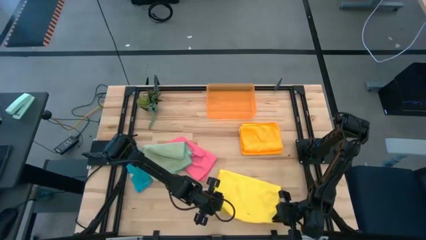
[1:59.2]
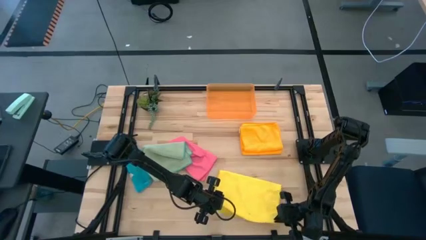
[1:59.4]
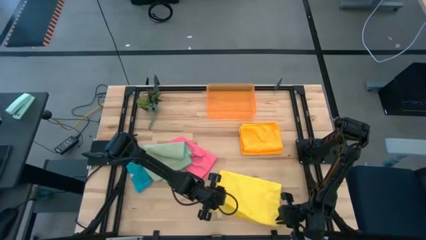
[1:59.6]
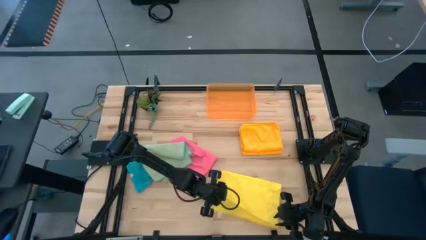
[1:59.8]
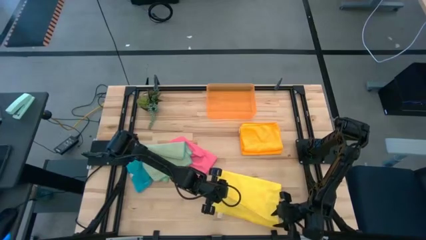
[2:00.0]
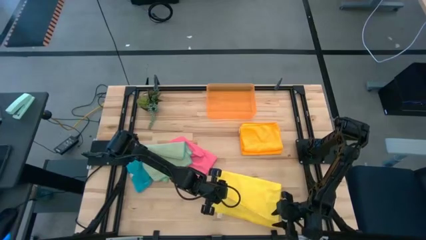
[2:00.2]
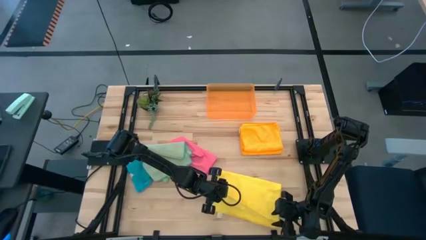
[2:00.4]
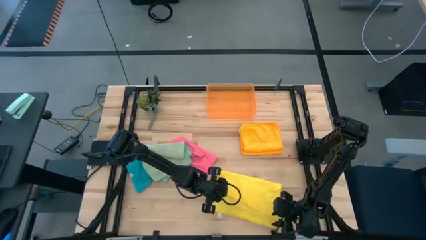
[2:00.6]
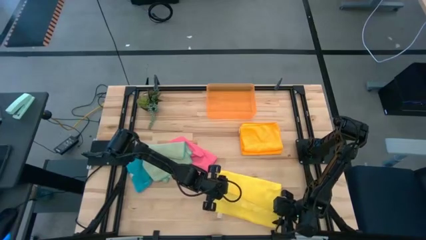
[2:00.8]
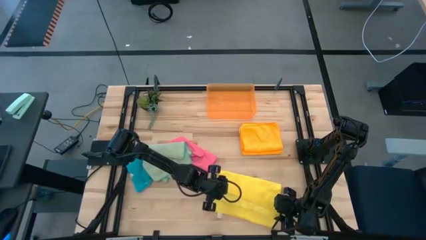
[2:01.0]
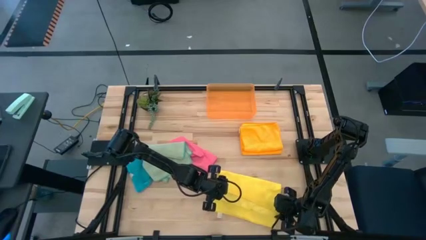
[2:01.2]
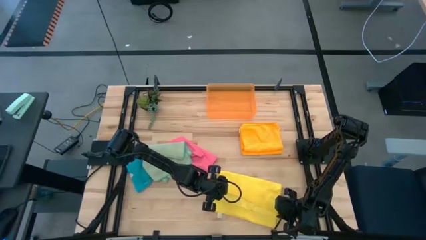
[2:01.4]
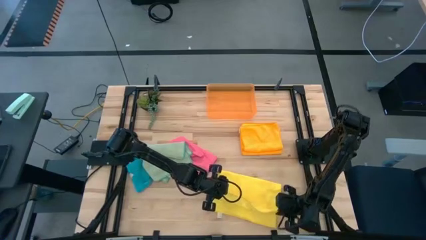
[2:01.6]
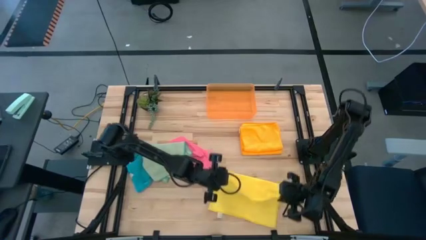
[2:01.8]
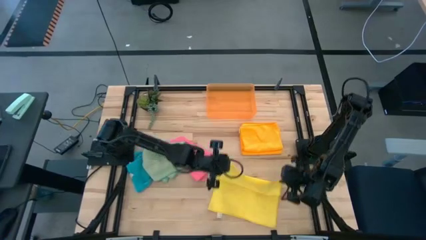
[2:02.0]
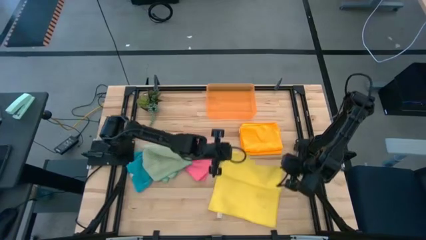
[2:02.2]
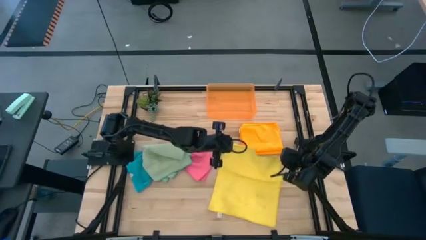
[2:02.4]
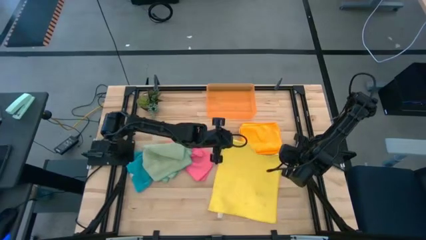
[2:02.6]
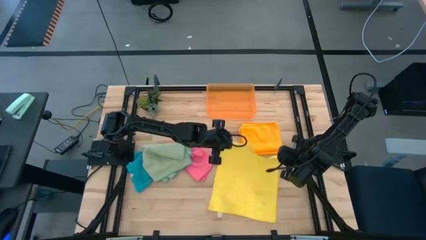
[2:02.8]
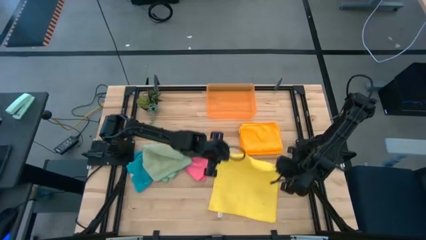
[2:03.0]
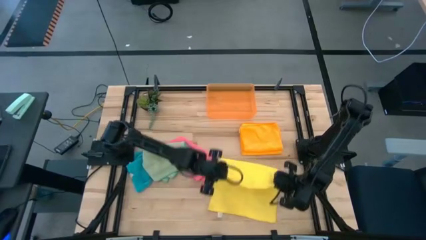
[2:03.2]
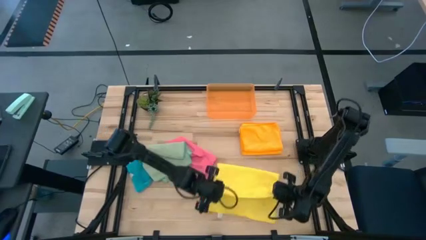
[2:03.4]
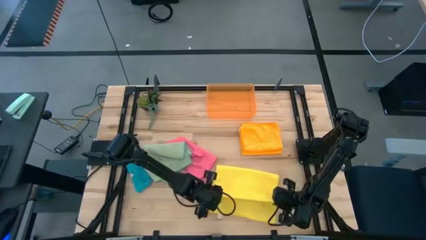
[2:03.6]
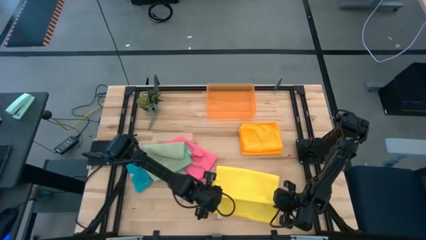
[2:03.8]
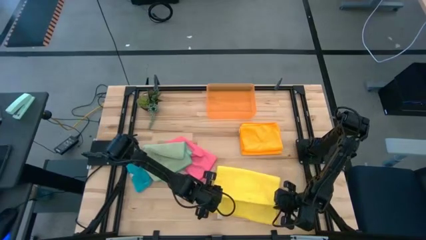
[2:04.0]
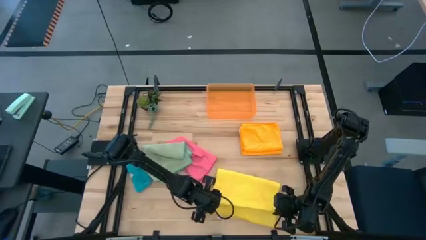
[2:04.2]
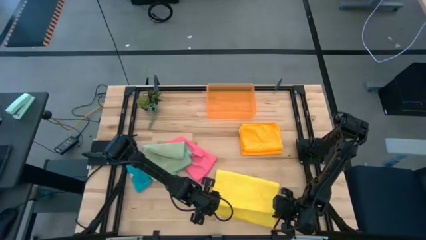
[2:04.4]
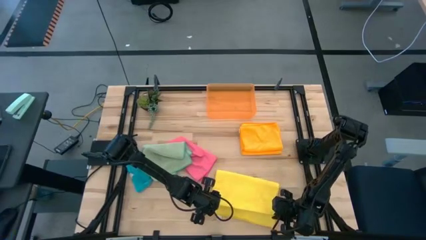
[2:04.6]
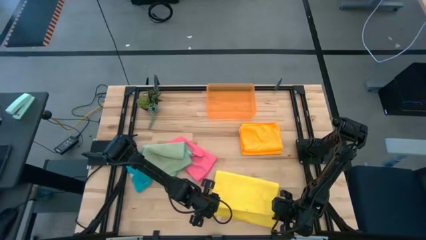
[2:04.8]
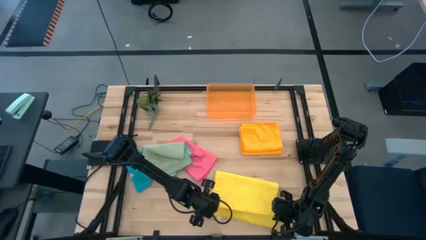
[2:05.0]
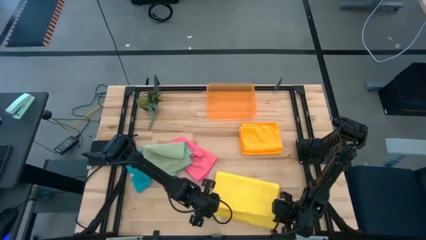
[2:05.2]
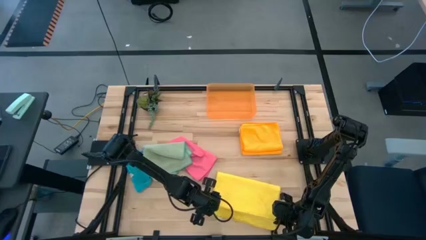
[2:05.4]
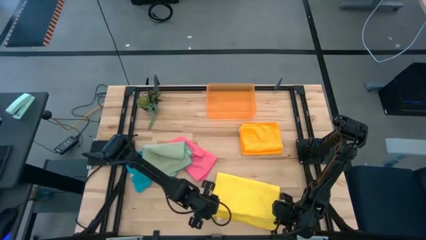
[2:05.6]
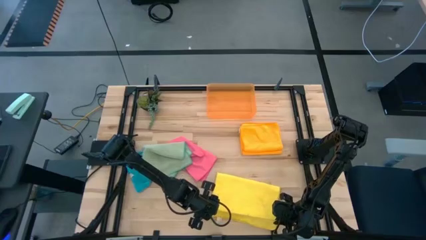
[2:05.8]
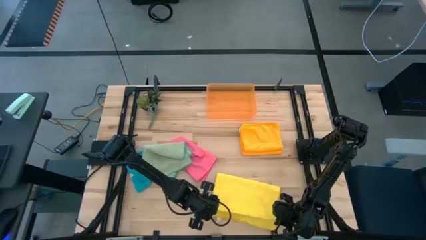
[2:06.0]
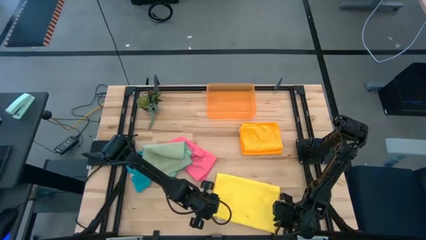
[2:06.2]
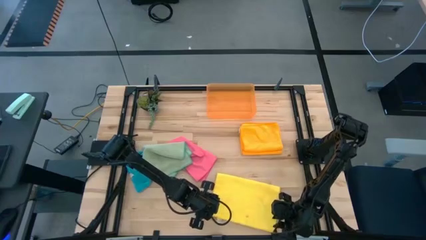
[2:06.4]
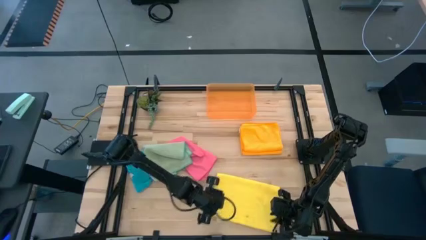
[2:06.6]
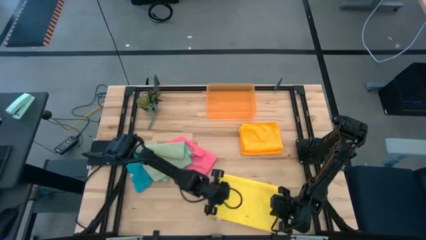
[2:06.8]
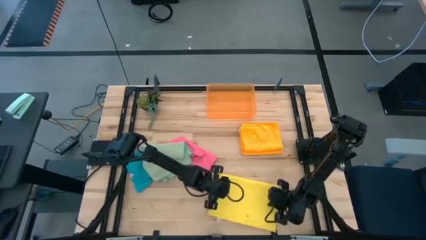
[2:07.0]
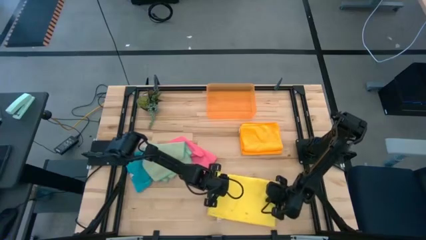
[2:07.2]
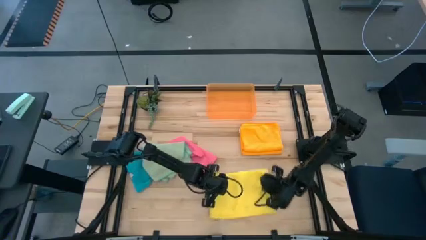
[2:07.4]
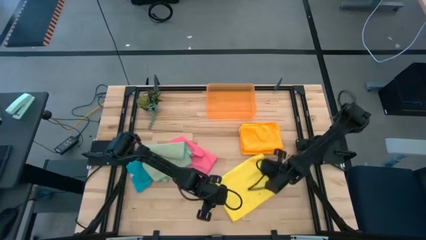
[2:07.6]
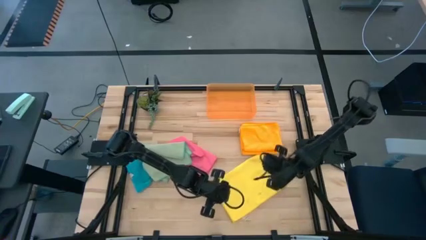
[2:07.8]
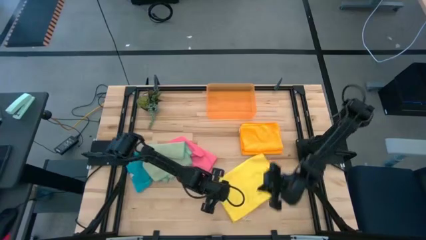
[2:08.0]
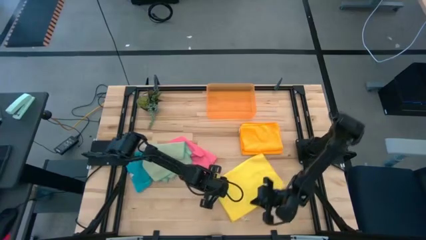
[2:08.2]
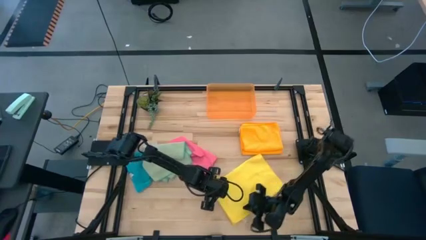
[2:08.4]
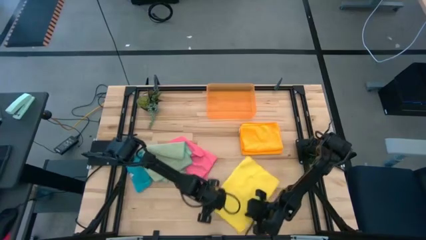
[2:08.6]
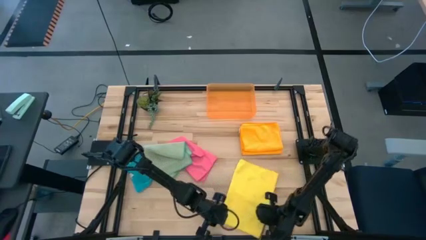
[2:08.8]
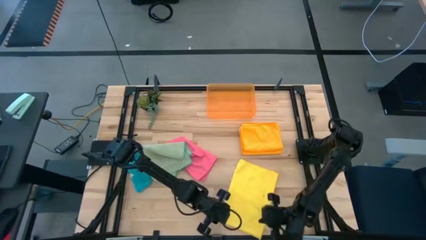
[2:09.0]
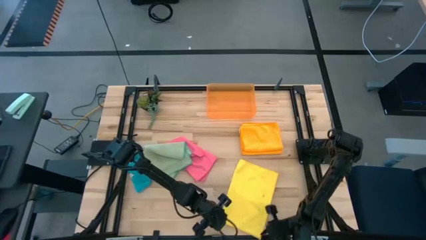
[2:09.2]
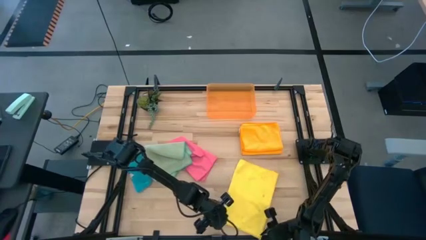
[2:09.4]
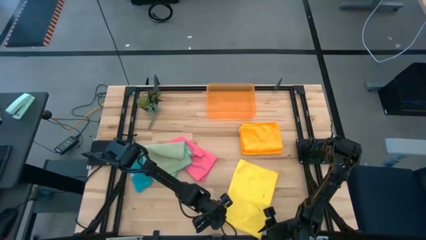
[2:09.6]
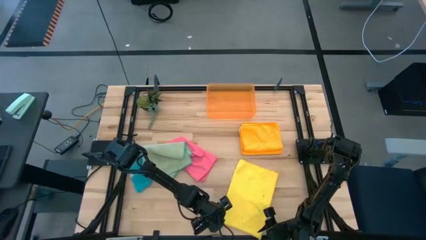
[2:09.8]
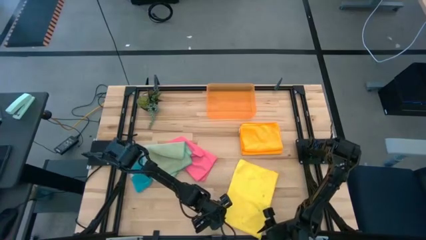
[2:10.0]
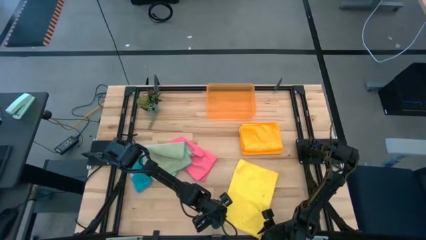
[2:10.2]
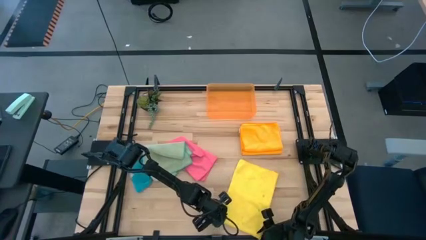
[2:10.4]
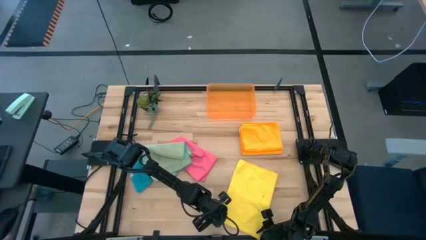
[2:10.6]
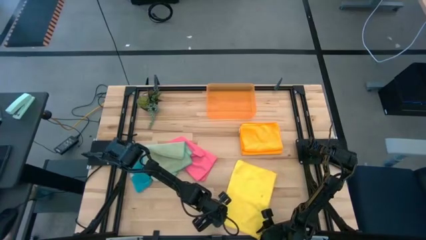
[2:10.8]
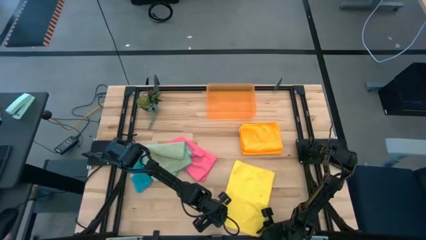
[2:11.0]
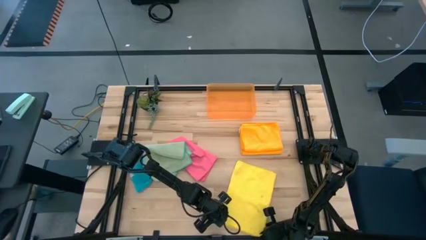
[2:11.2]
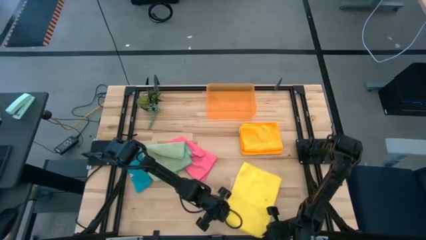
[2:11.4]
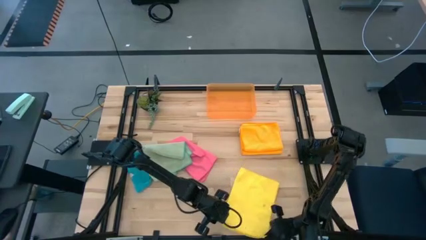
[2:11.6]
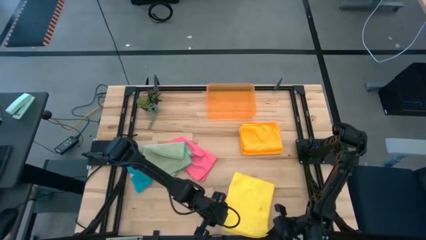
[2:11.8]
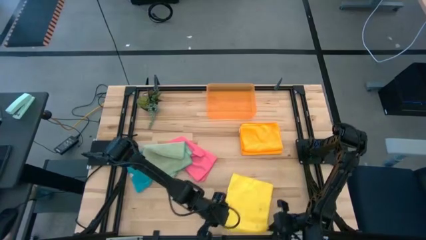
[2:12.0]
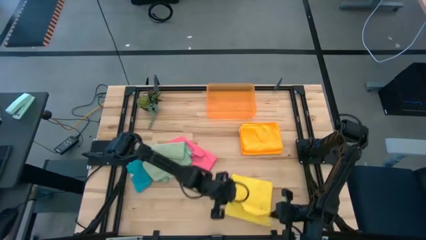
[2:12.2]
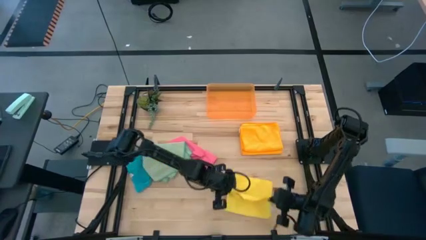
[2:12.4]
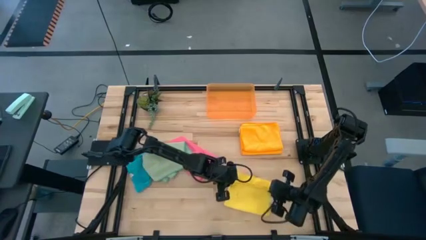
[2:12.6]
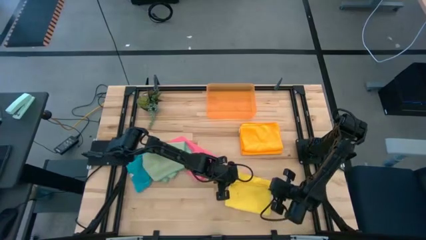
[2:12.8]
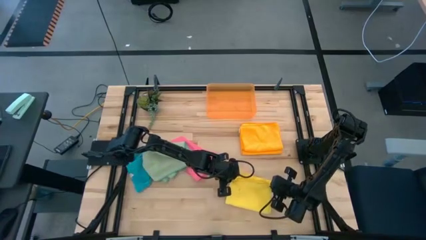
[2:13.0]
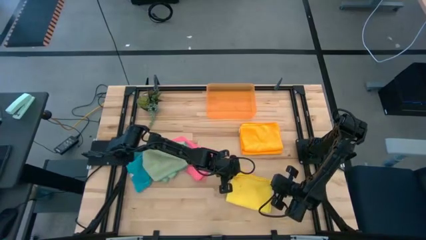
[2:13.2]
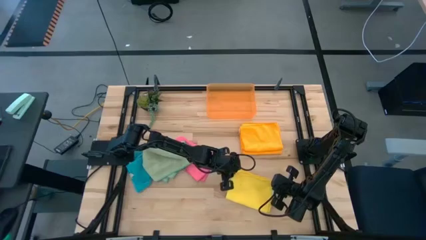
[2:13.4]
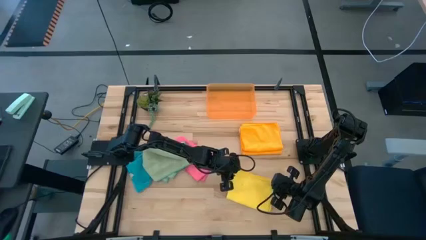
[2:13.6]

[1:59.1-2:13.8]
Task: Fold microfiber towels
Fold the yellow microfiber cloth

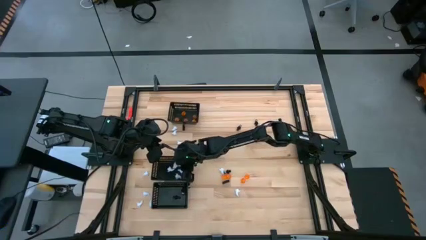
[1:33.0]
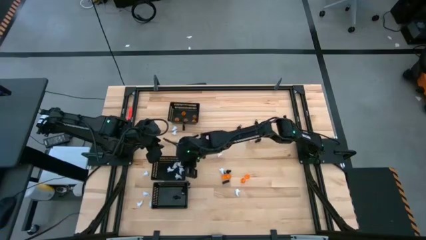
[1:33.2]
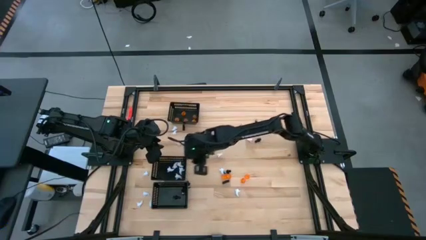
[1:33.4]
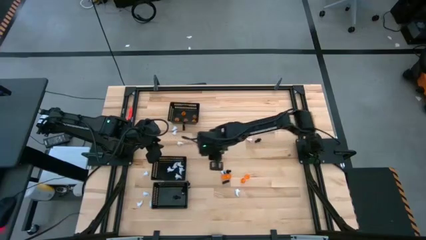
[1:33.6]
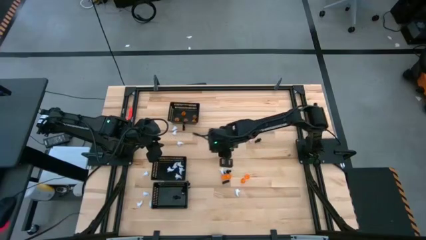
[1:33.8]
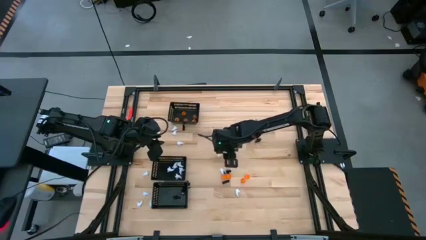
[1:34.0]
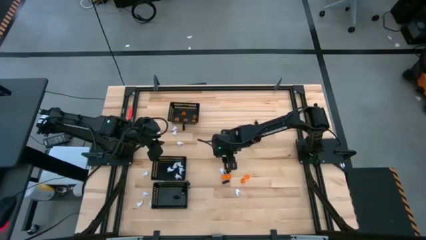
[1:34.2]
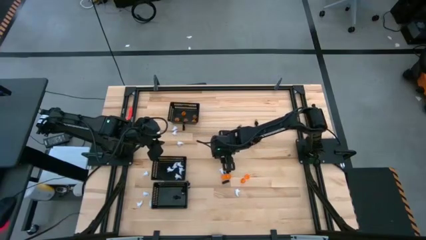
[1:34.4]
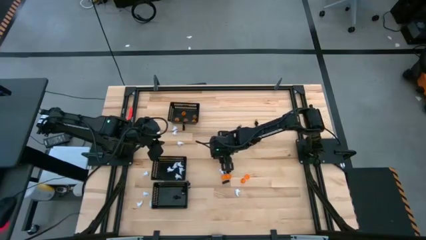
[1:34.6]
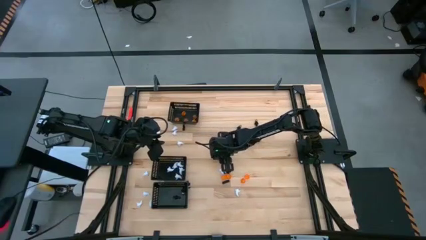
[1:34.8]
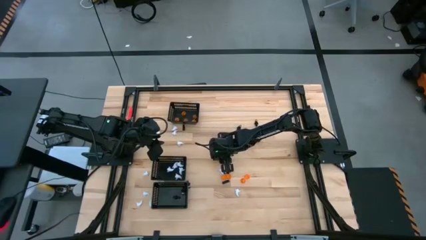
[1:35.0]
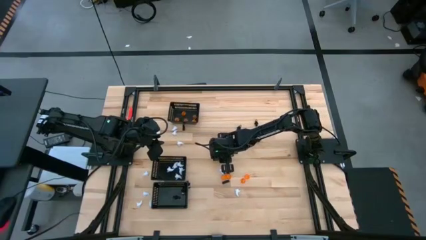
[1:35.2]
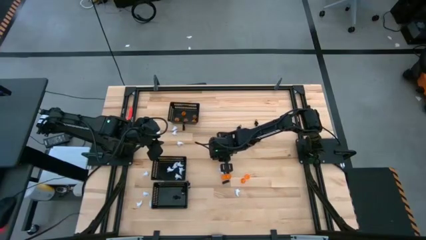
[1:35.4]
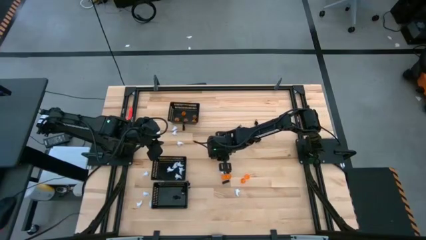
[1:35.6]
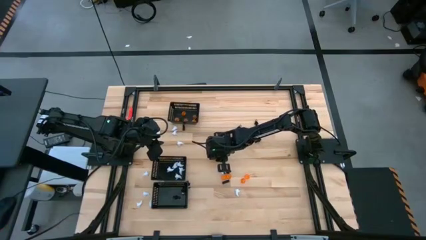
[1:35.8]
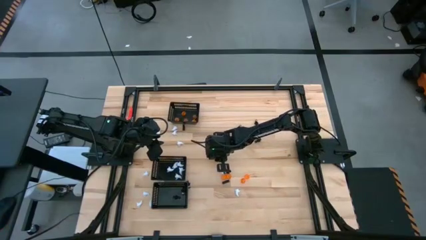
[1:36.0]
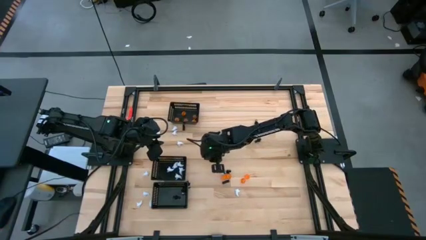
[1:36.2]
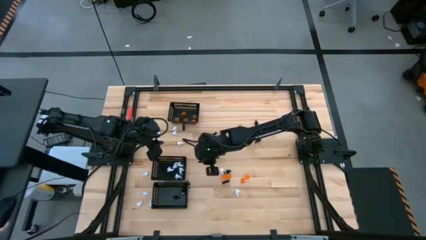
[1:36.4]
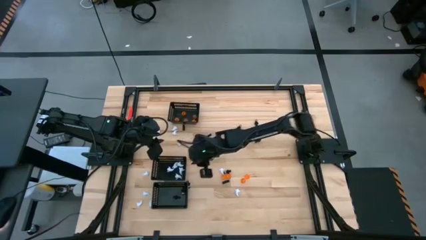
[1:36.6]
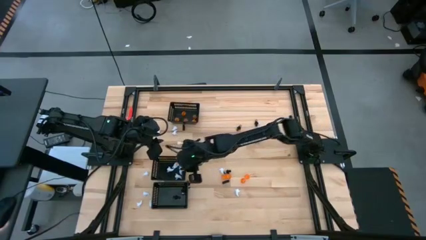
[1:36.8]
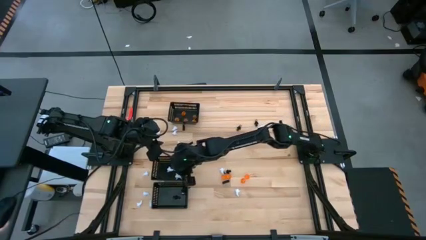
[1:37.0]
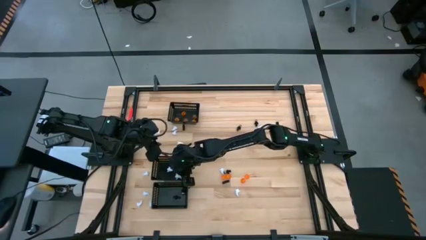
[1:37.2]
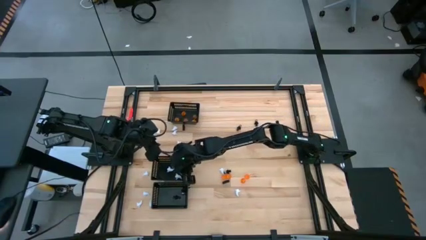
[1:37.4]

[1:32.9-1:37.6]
Task: Sort Halloween decoration
Put the white toy into the middle black bin
